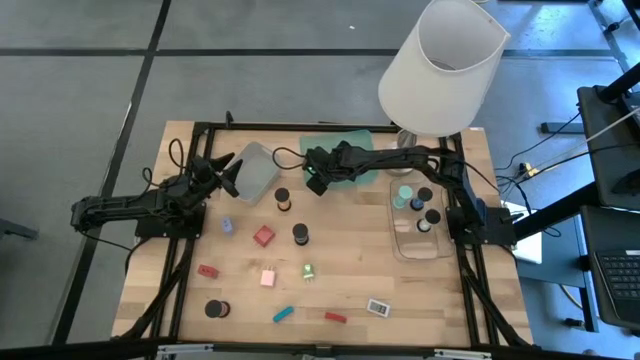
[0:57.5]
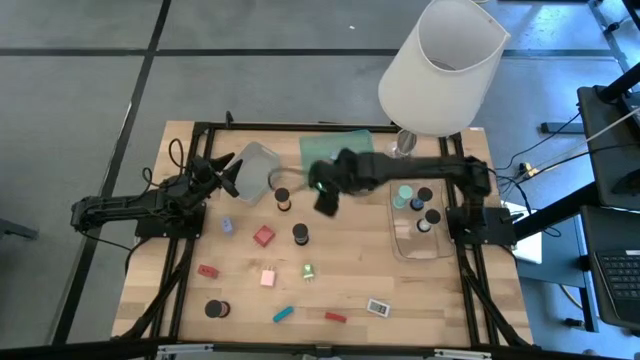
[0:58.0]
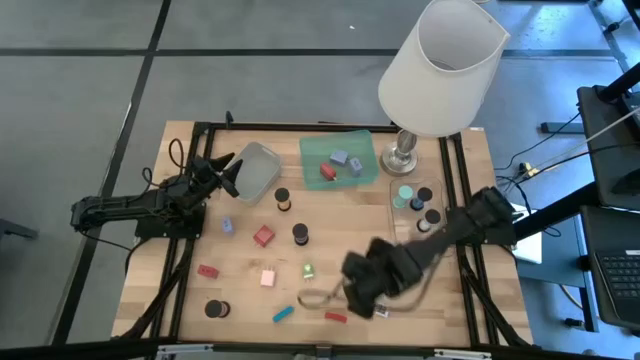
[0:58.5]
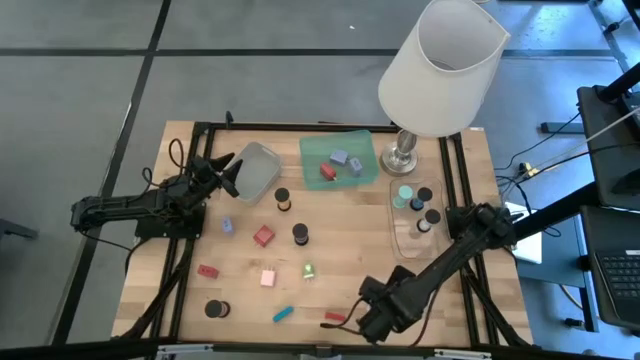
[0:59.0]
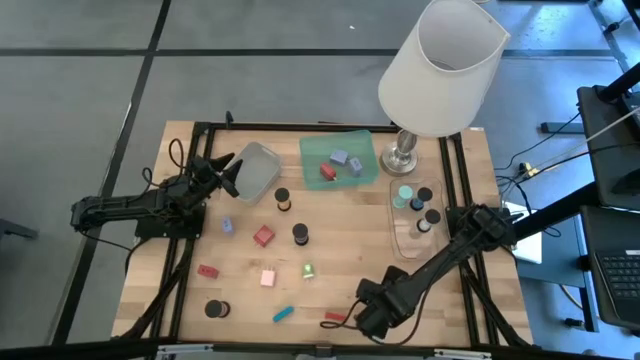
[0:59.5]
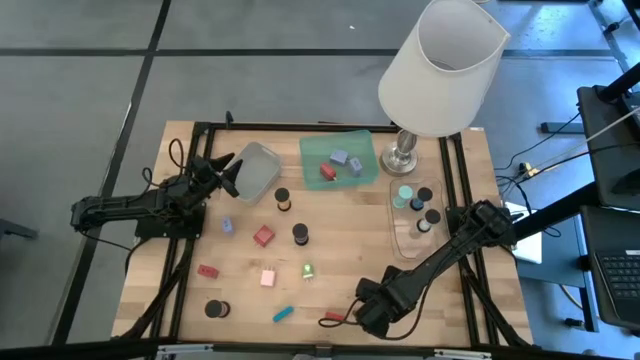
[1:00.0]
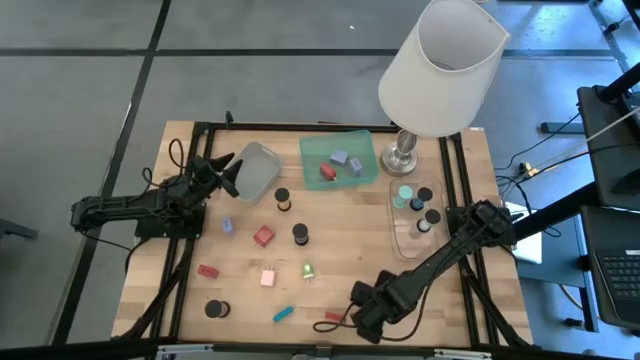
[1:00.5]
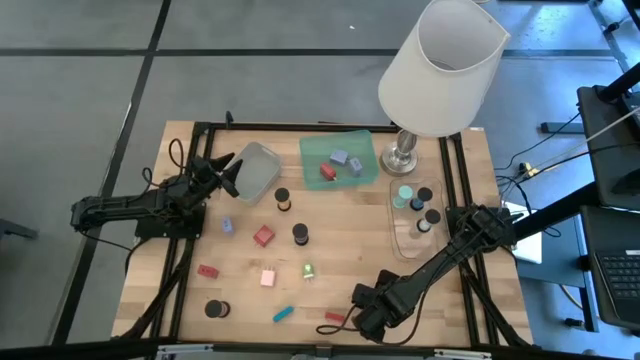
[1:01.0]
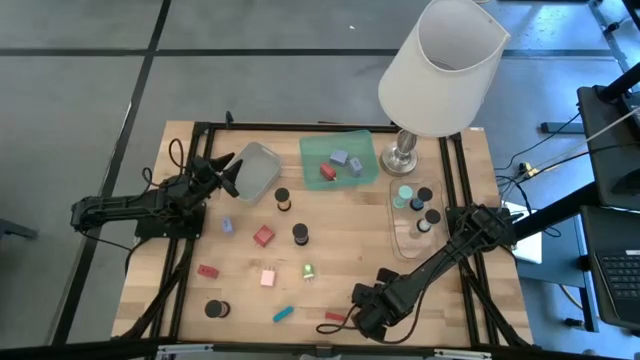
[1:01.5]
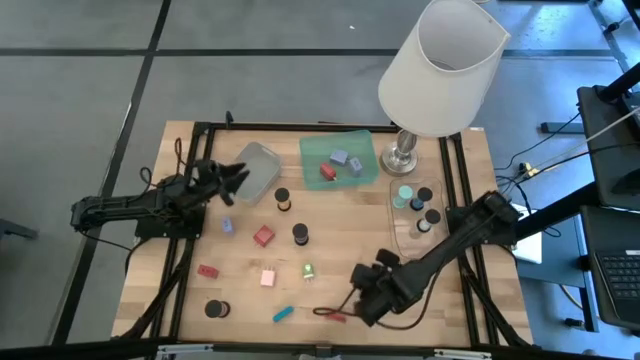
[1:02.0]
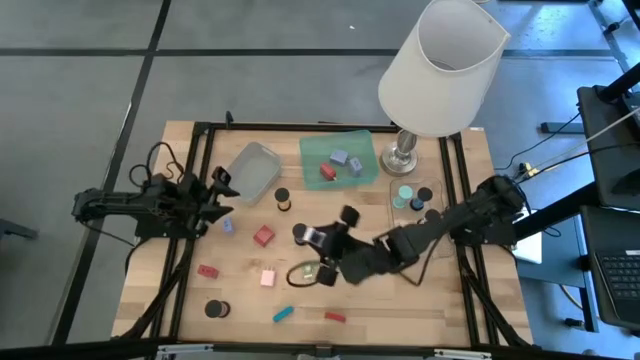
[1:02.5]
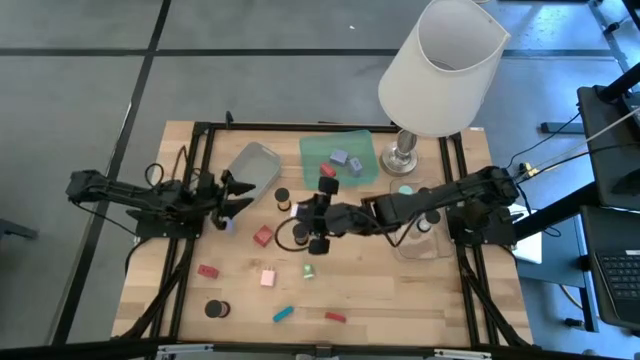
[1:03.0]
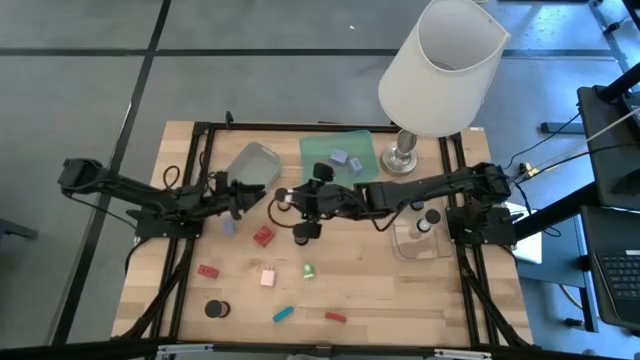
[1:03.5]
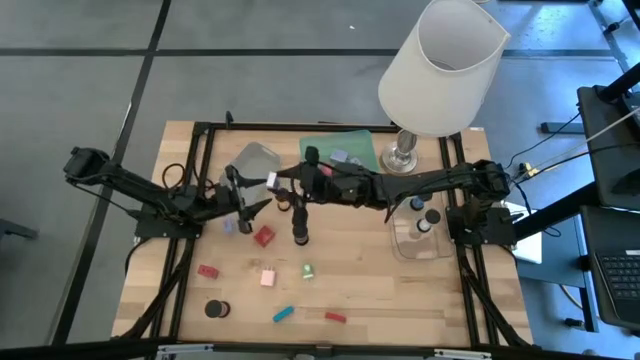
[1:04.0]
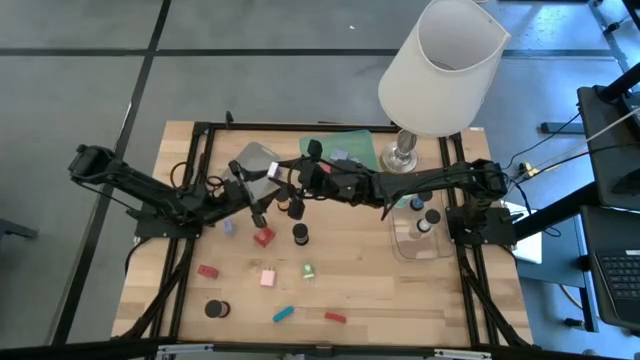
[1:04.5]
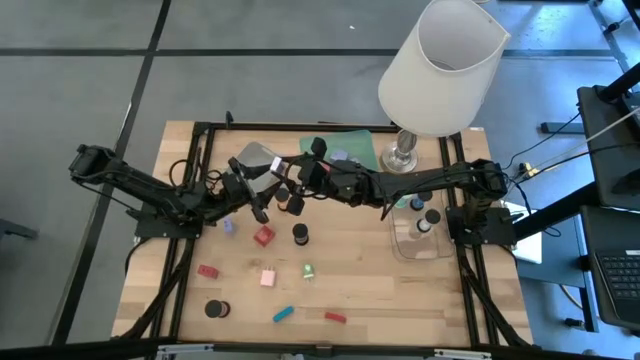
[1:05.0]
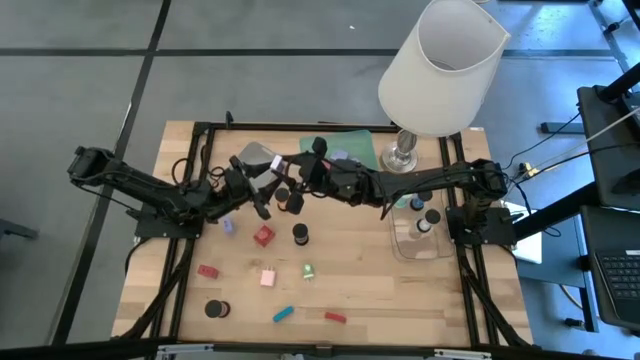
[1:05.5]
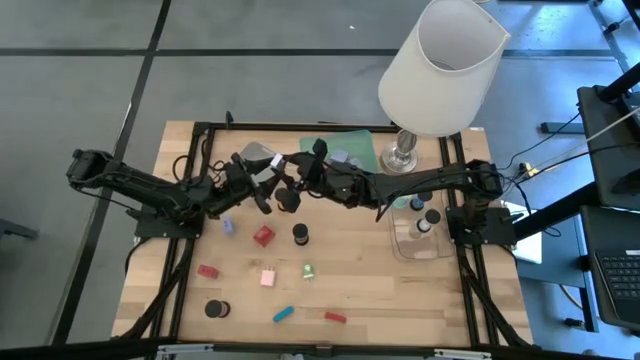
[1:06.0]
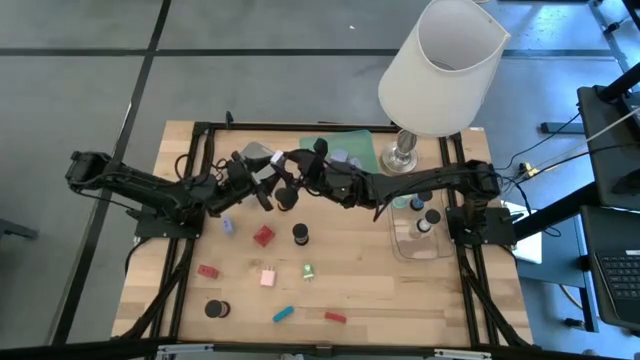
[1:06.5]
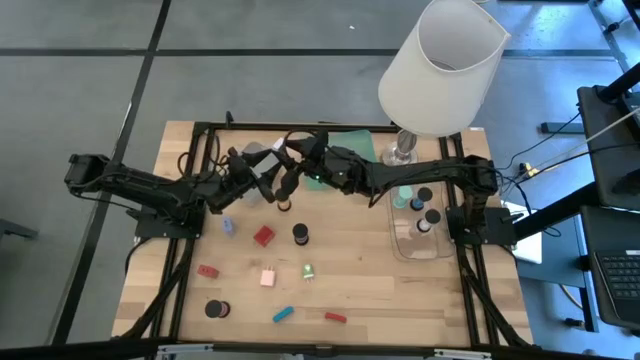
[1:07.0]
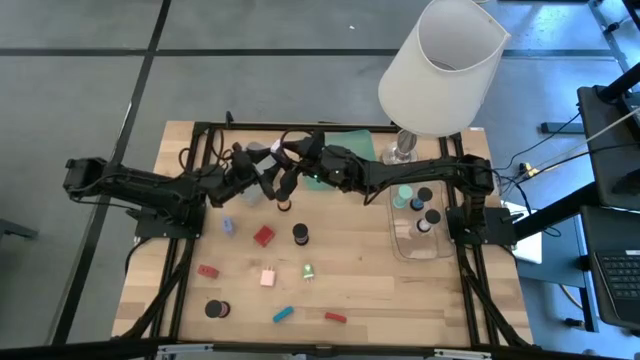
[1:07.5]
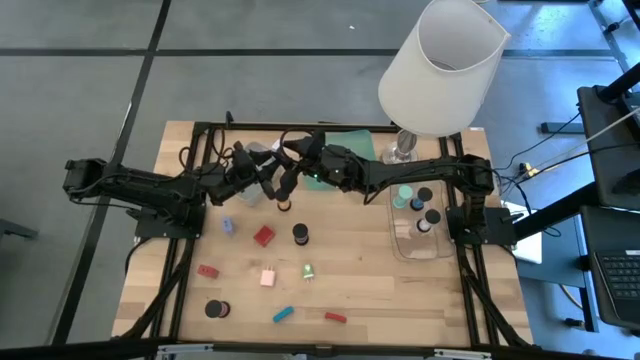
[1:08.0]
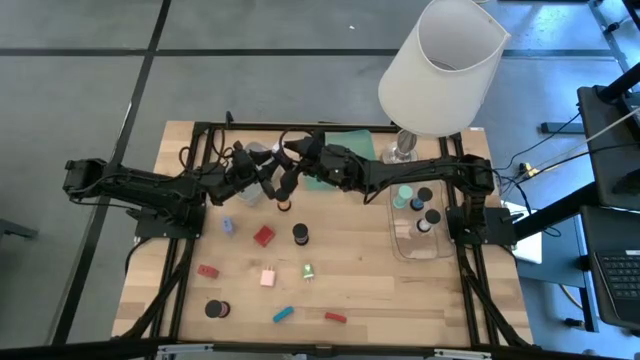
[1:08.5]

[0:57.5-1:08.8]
Task: Pick & Place Office items
Put the white digital clock into the gray bin

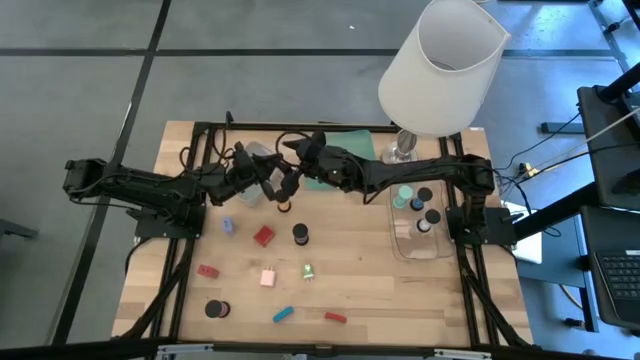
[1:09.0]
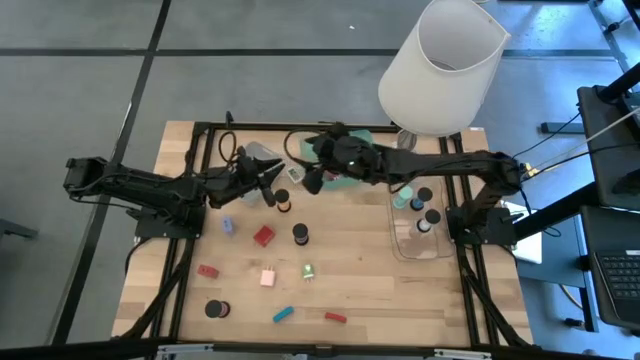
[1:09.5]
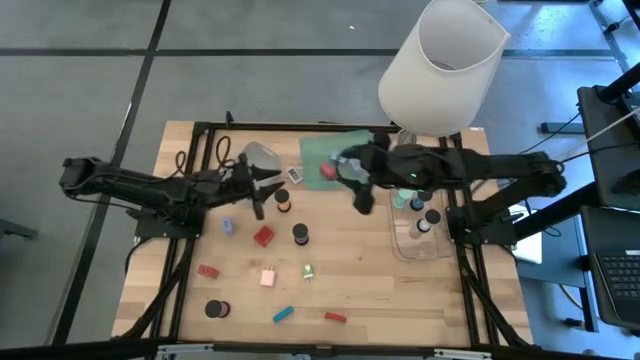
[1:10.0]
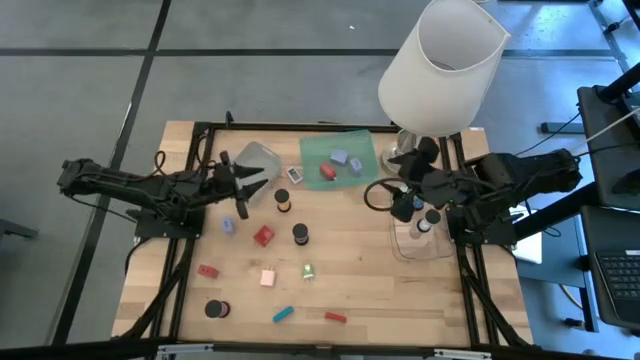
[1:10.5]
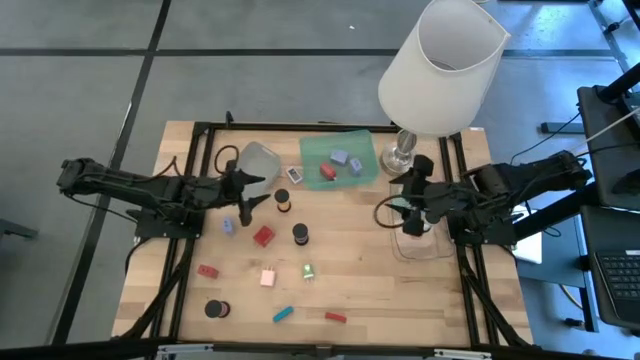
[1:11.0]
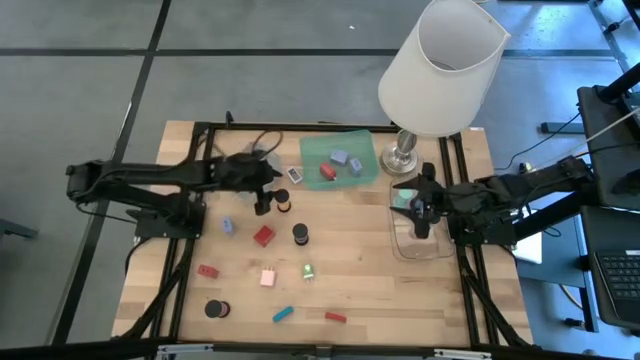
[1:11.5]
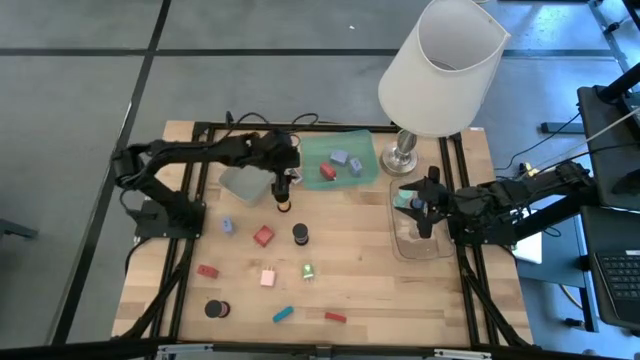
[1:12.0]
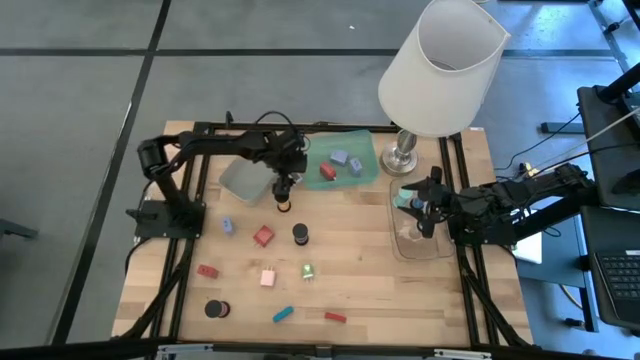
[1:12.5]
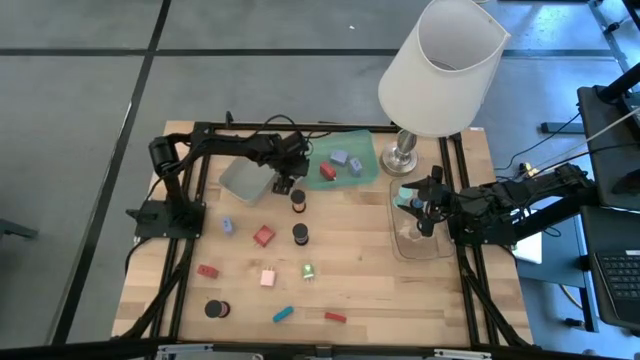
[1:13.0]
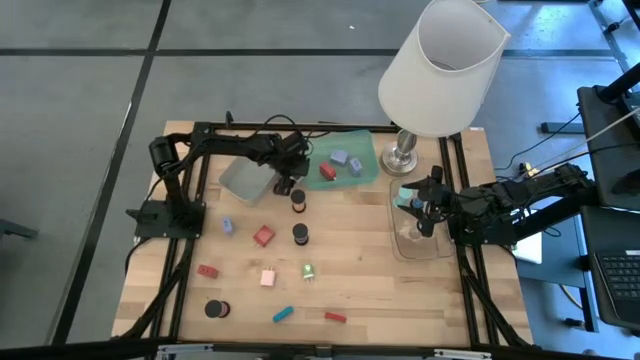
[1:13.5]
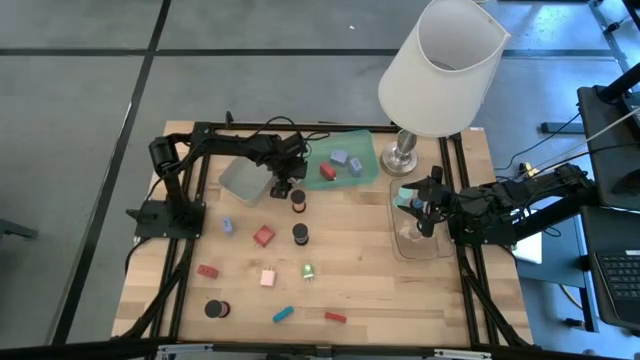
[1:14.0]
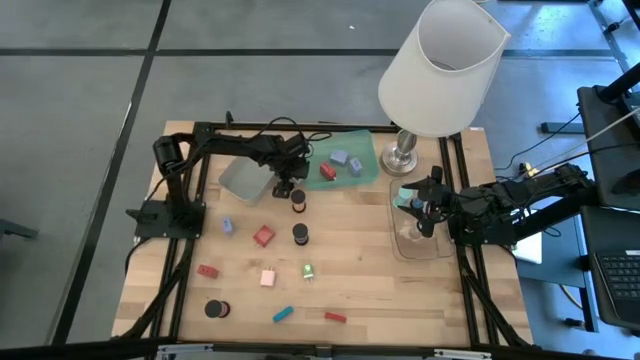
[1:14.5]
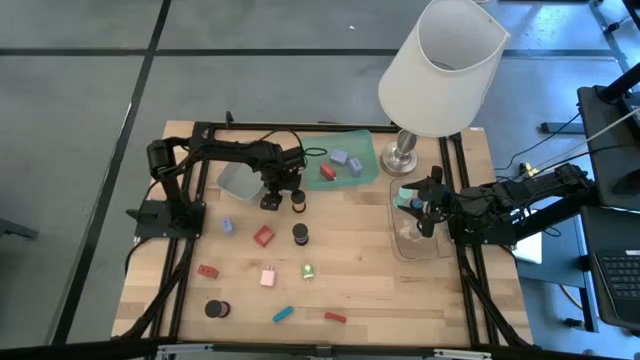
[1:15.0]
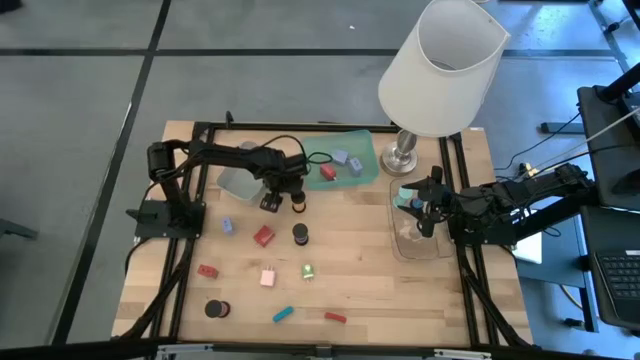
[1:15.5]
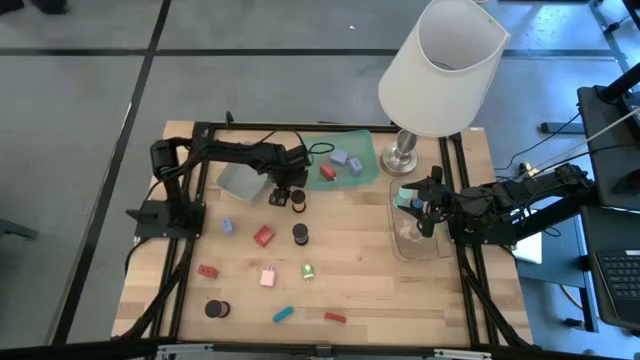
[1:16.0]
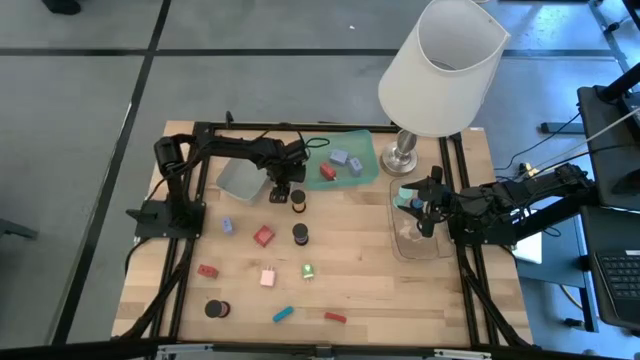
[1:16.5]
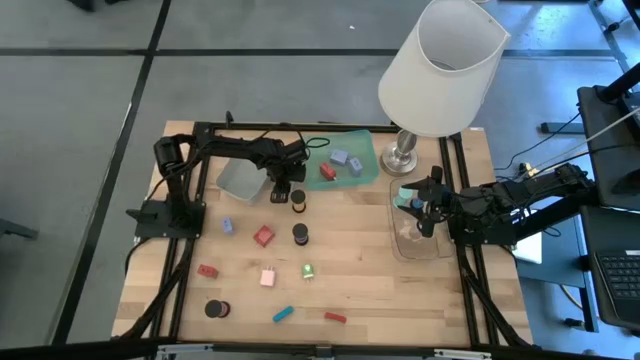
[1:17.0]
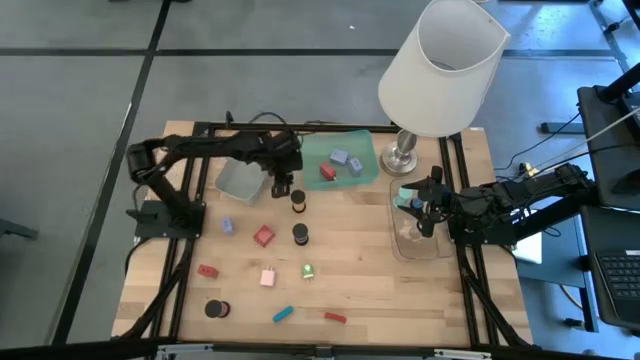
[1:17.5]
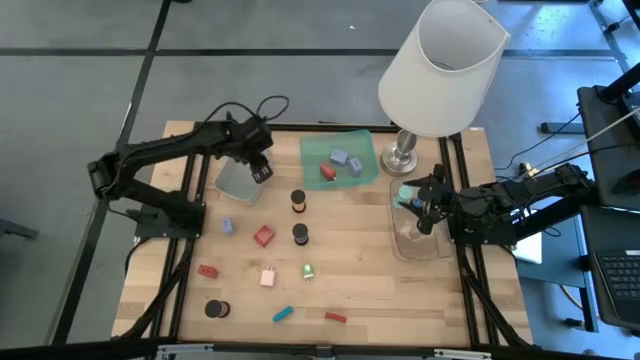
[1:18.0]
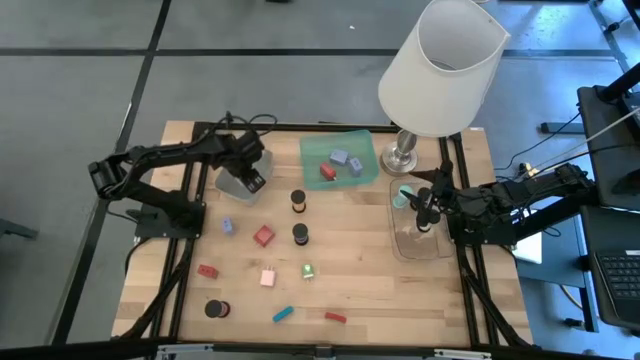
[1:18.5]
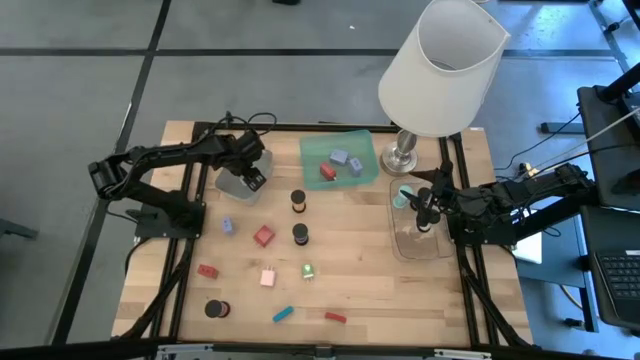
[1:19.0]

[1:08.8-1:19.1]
Put the white digital clock into the gray bin
